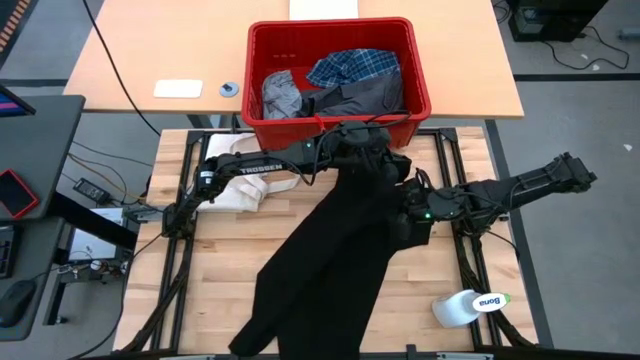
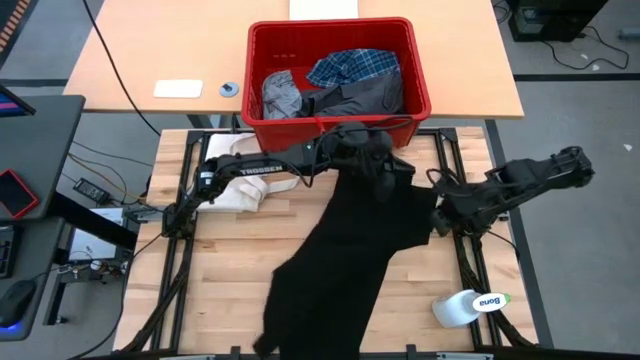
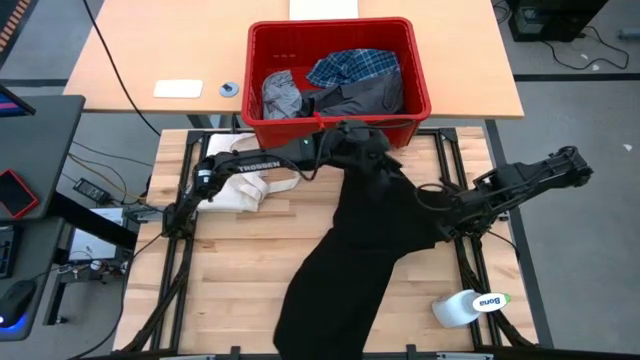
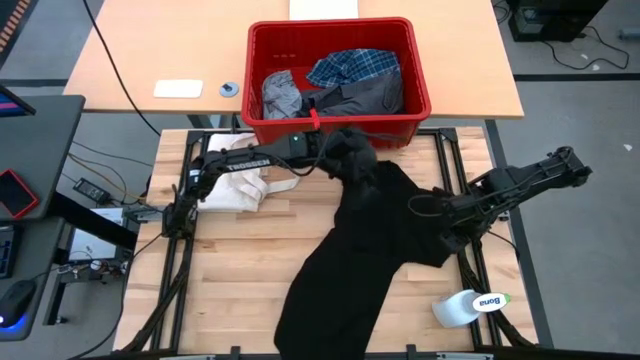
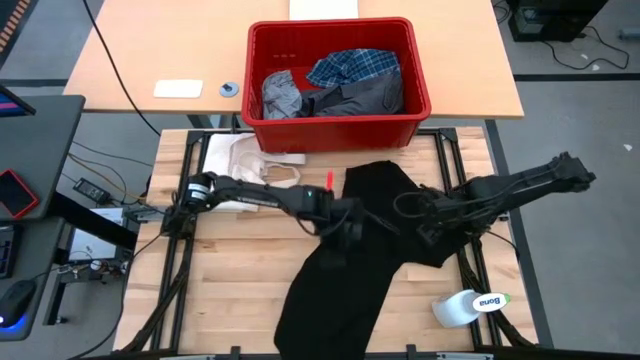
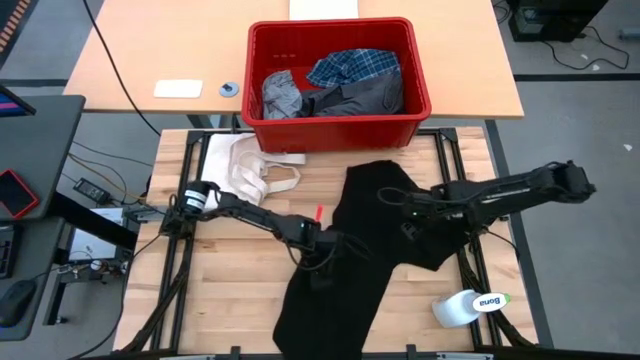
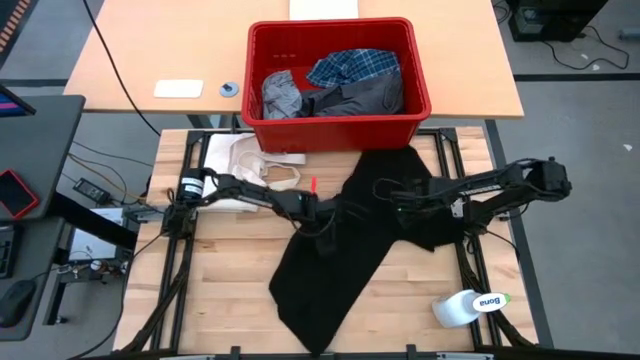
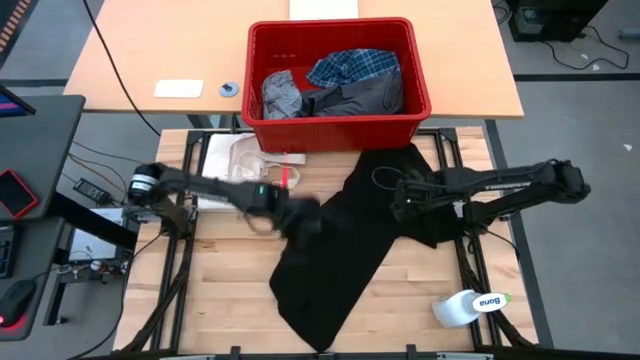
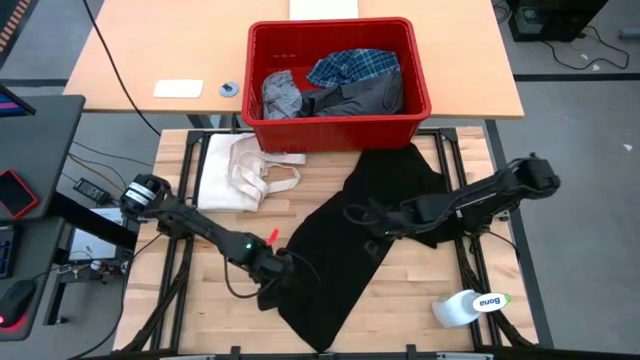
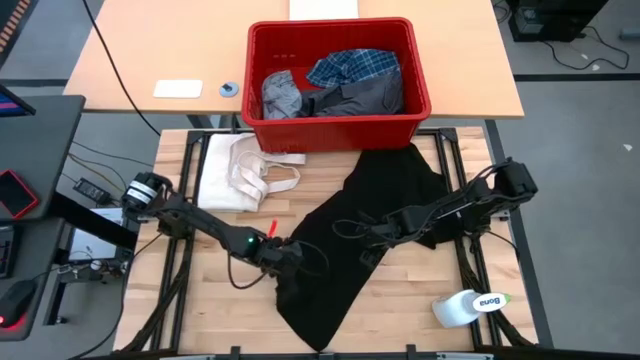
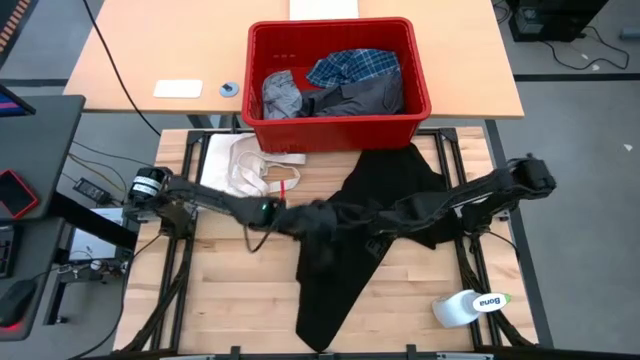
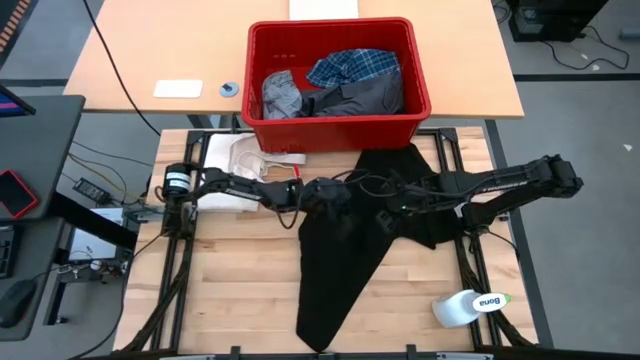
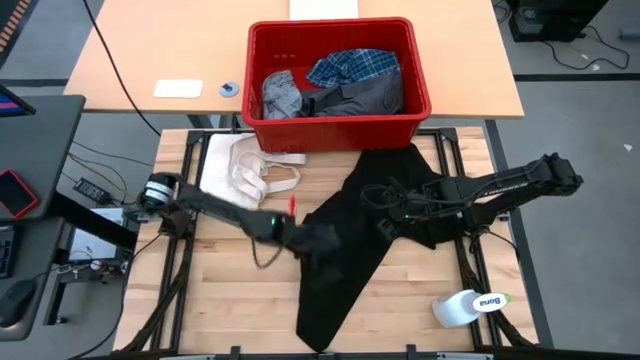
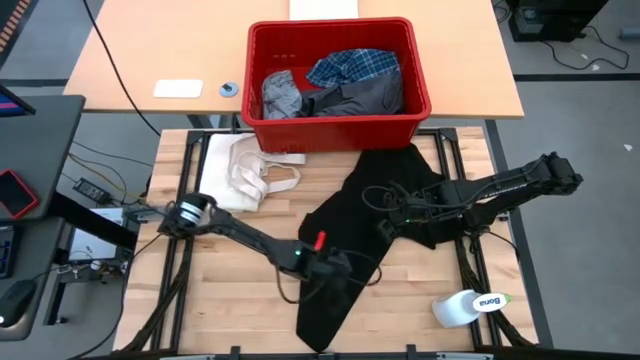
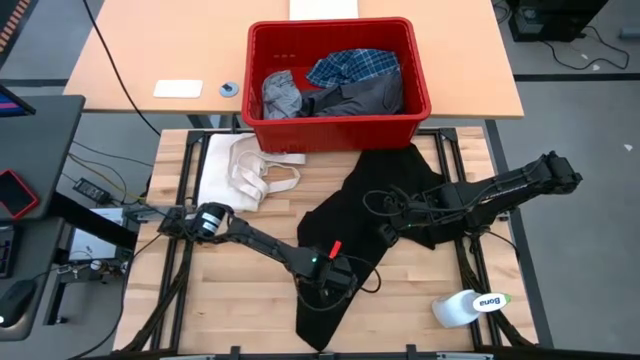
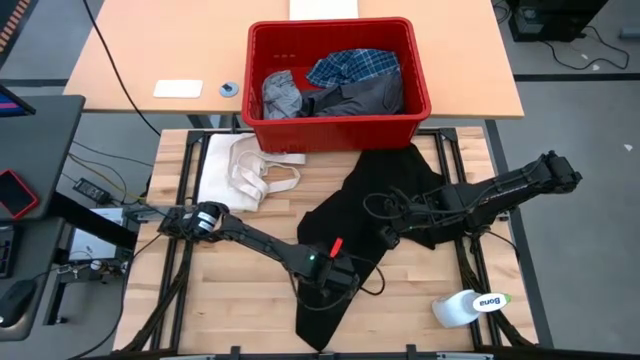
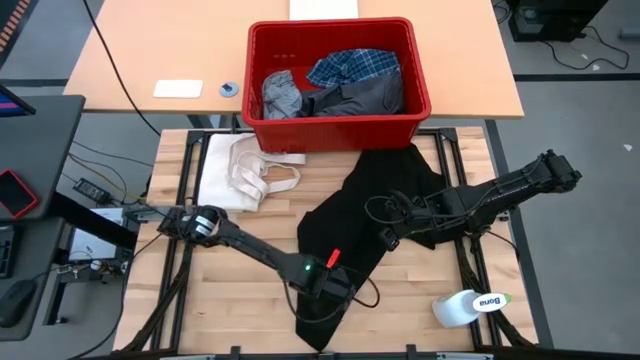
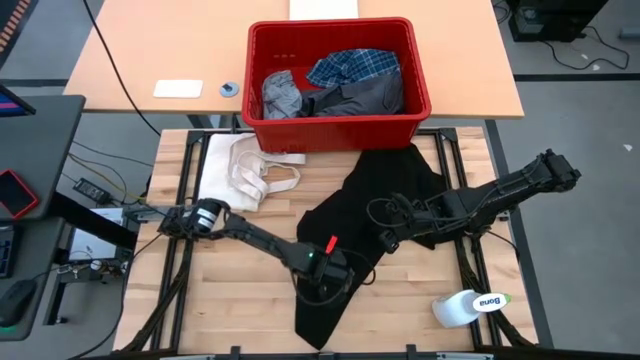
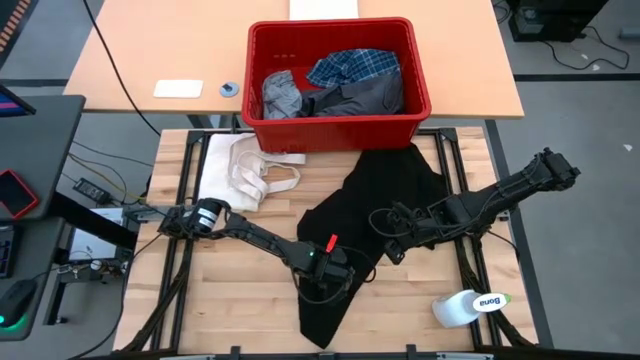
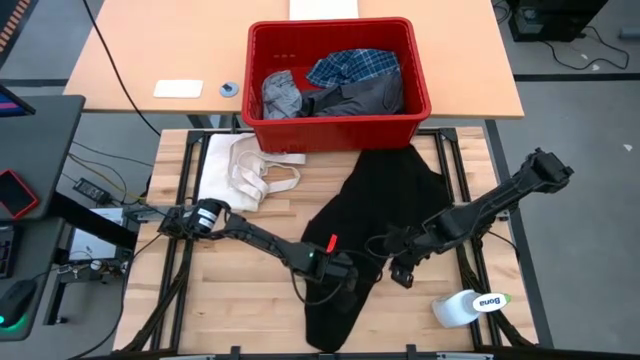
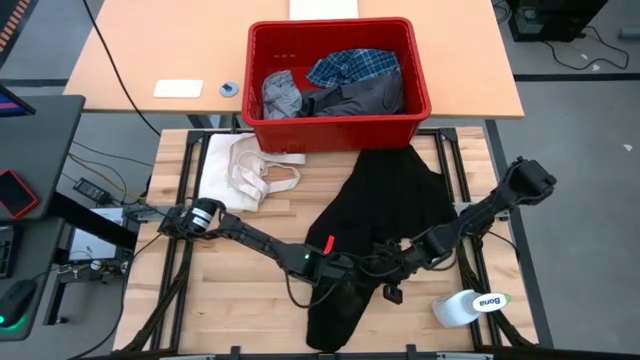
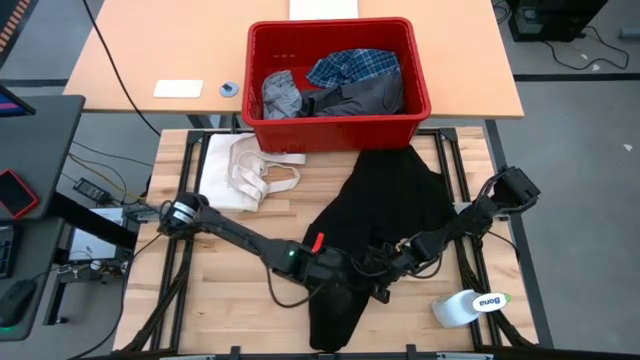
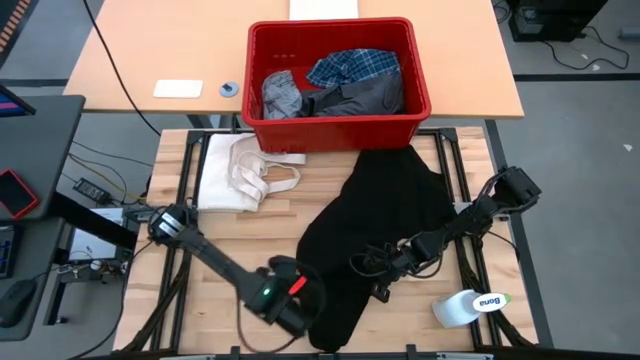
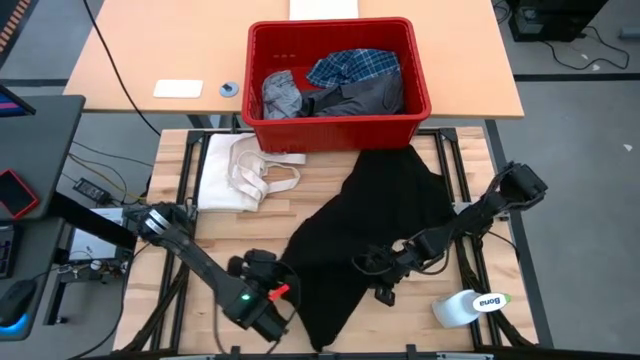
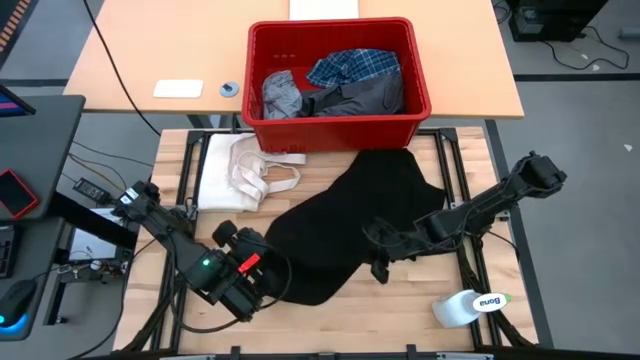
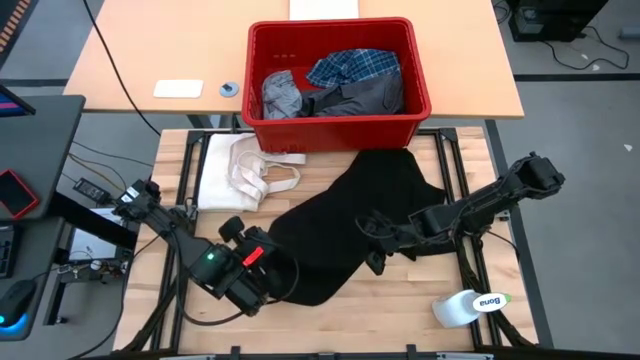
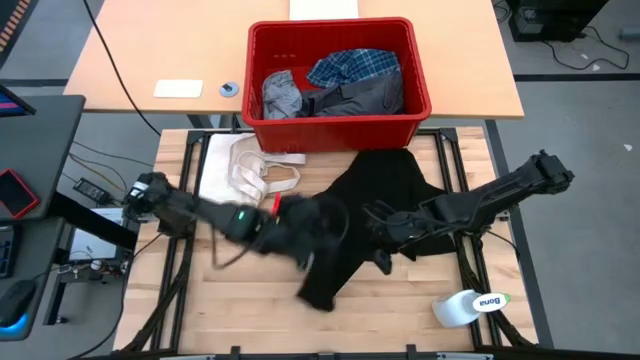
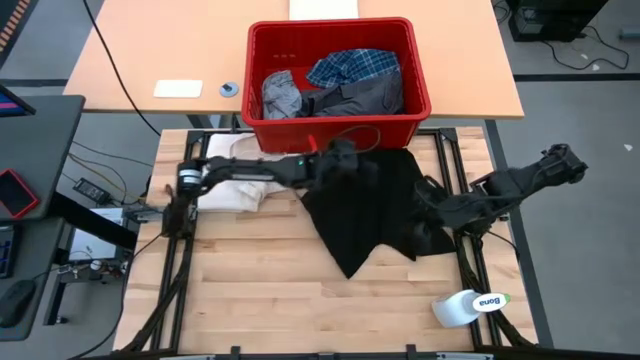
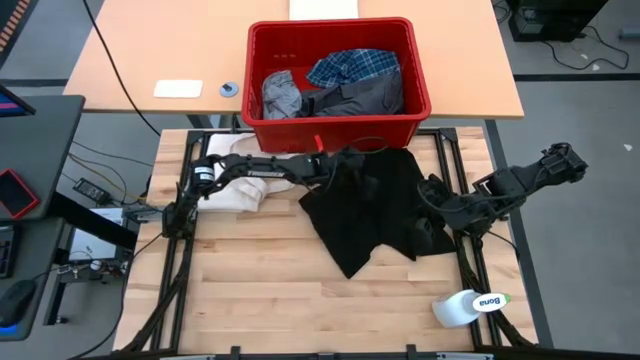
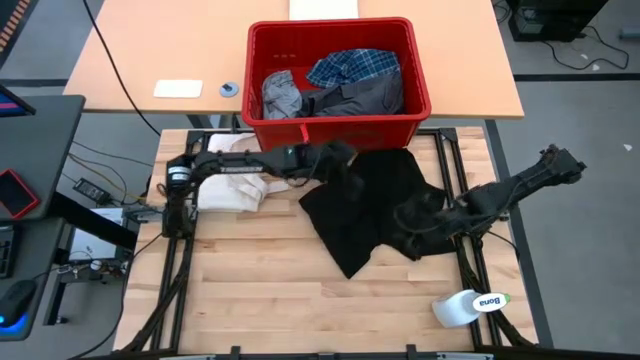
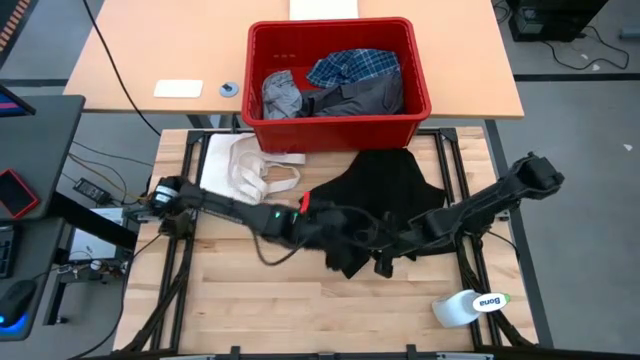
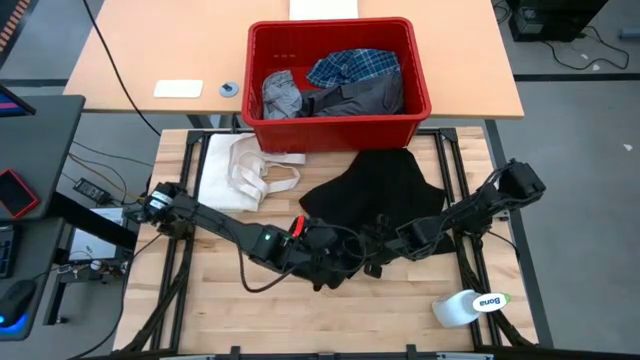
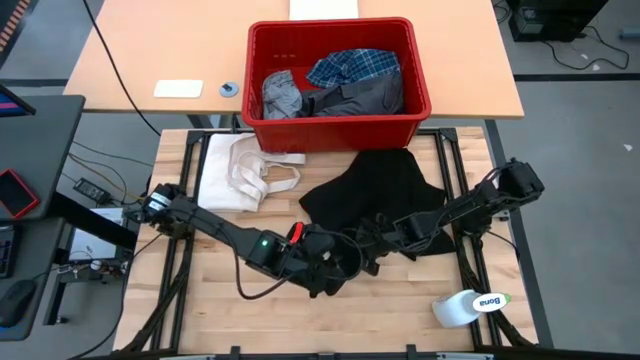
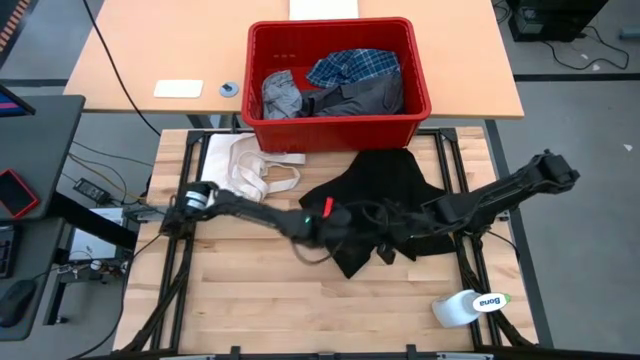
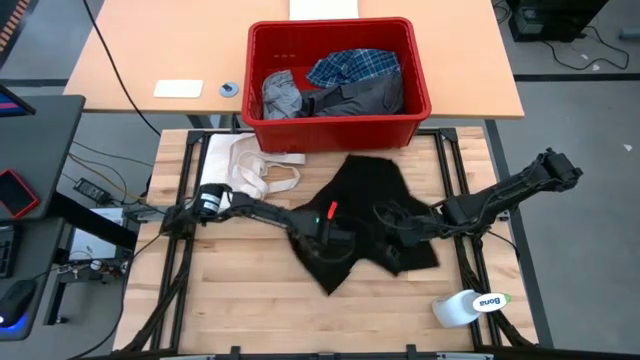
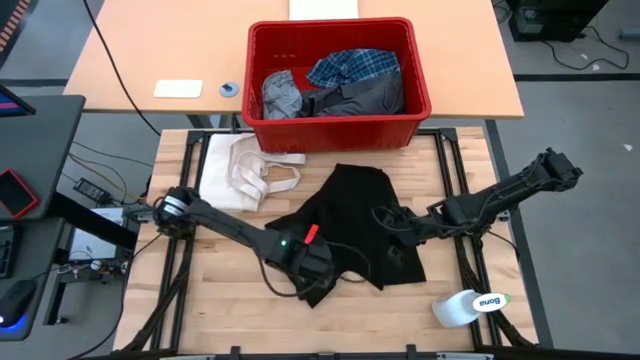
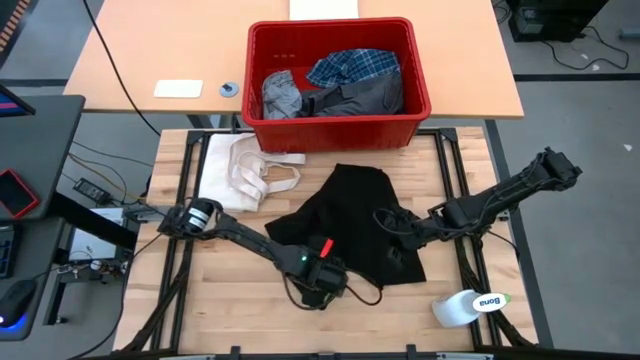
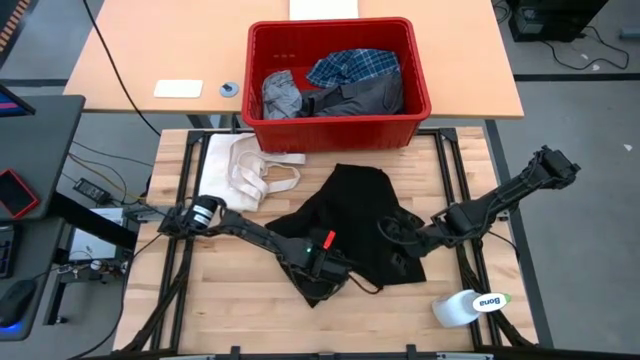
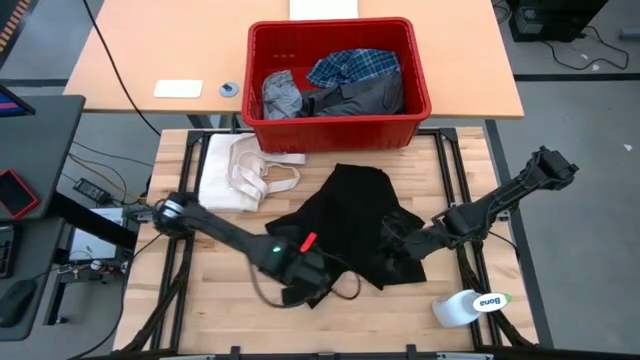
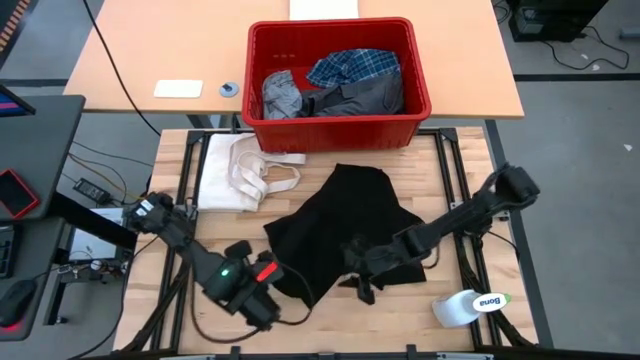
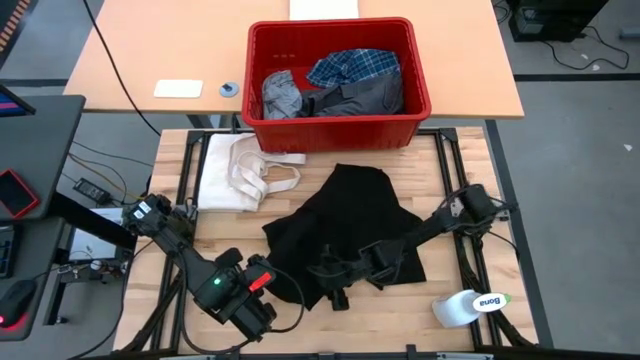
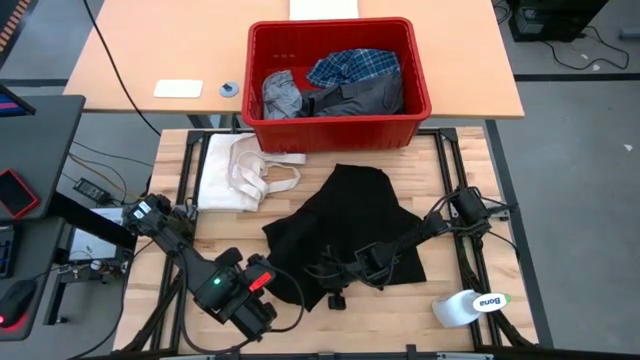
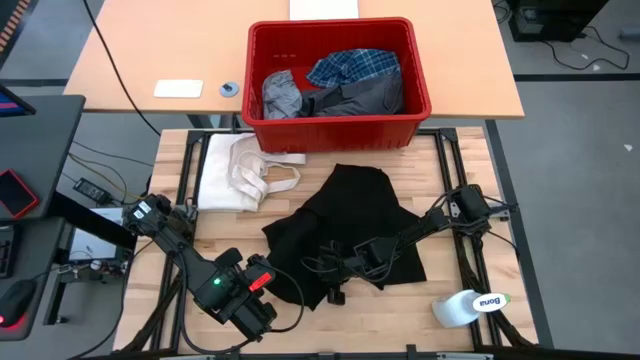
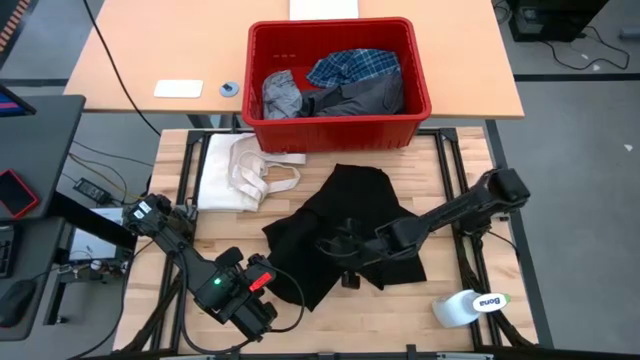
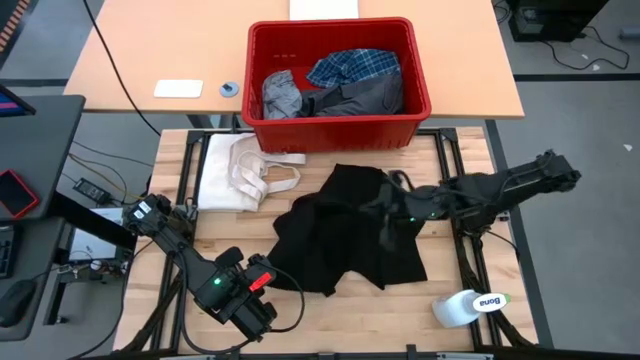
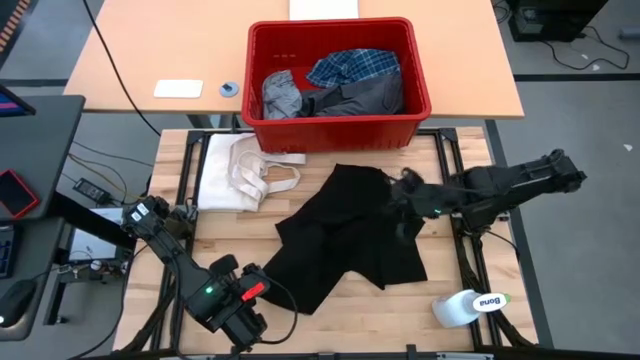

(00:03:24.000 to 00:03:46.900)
Task: Fold Laundry from Bin
Fold the black shirt
